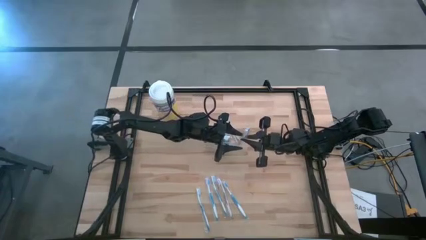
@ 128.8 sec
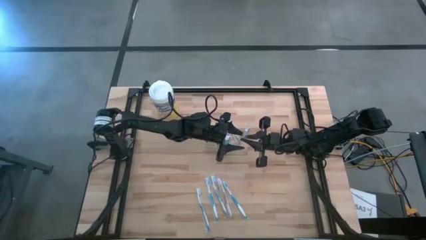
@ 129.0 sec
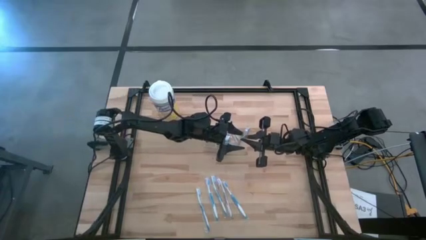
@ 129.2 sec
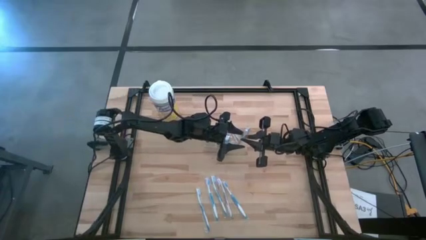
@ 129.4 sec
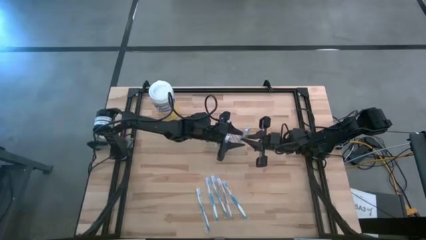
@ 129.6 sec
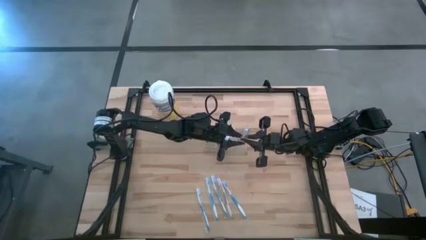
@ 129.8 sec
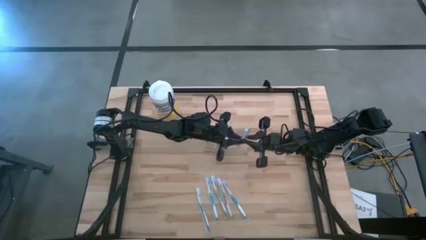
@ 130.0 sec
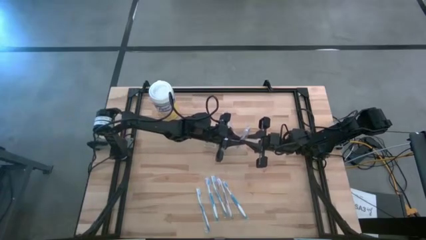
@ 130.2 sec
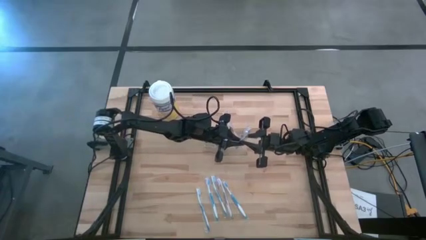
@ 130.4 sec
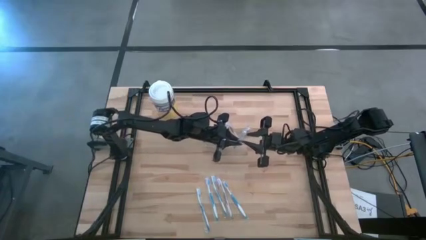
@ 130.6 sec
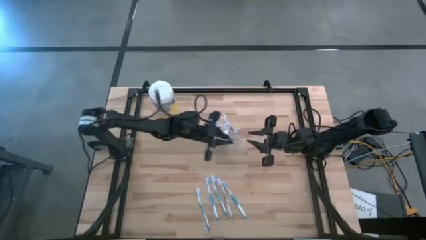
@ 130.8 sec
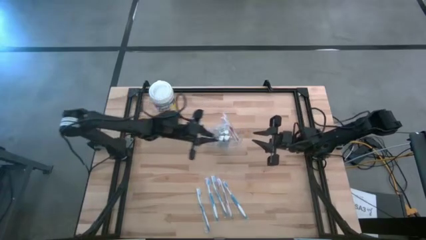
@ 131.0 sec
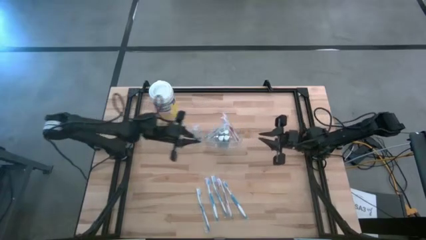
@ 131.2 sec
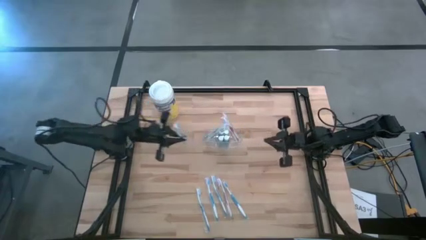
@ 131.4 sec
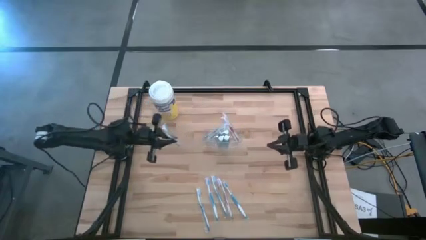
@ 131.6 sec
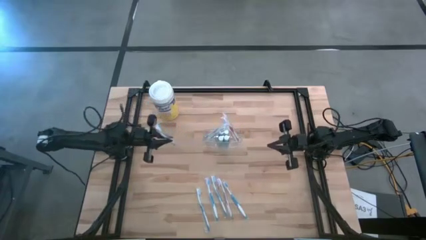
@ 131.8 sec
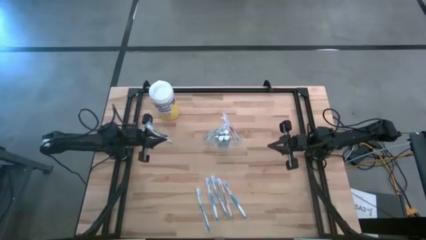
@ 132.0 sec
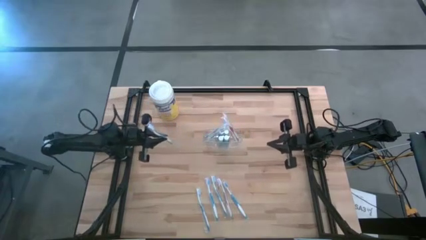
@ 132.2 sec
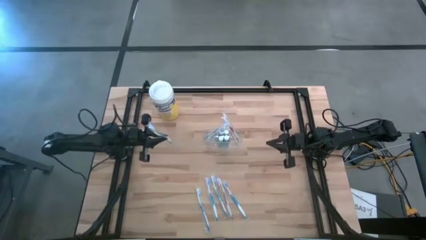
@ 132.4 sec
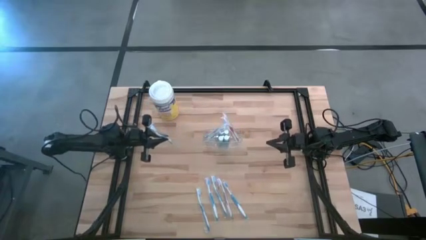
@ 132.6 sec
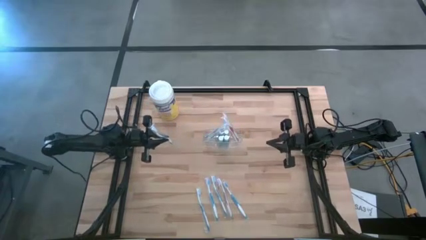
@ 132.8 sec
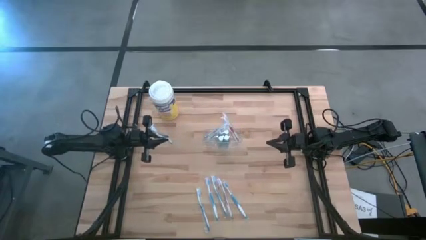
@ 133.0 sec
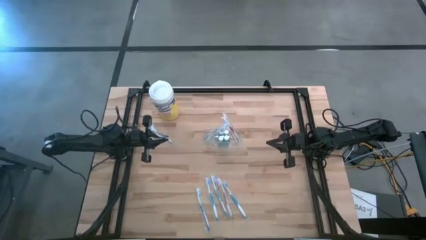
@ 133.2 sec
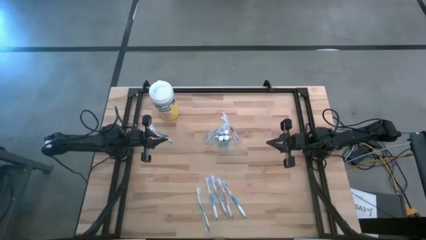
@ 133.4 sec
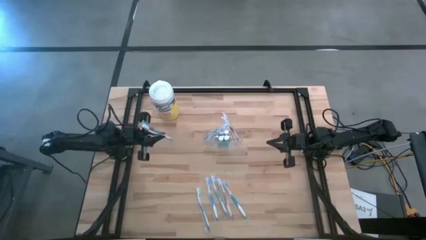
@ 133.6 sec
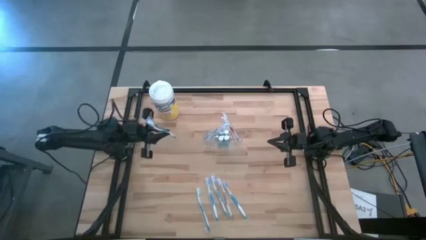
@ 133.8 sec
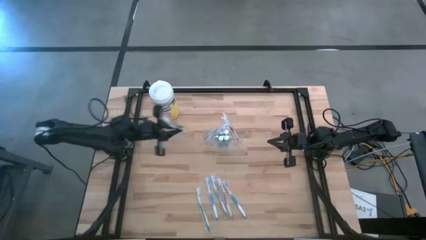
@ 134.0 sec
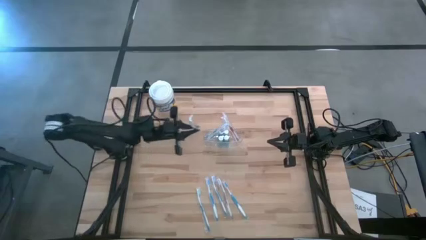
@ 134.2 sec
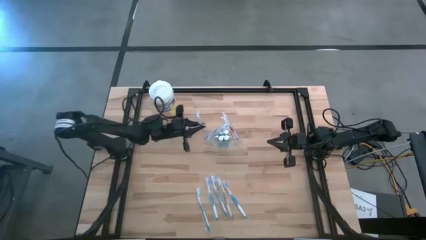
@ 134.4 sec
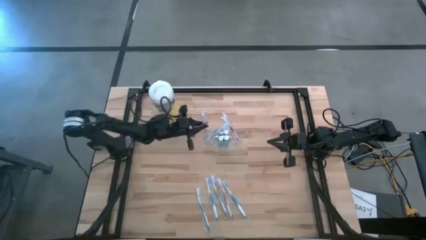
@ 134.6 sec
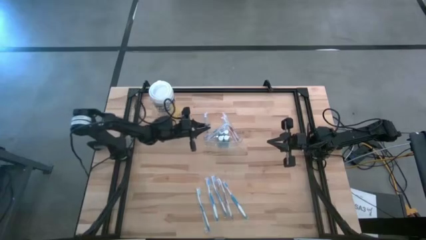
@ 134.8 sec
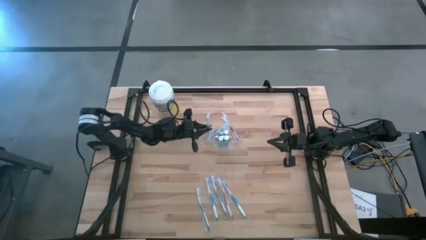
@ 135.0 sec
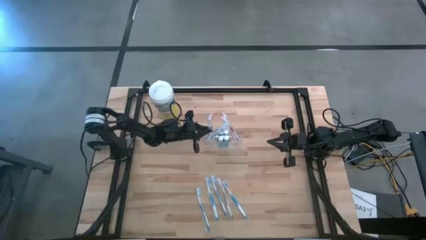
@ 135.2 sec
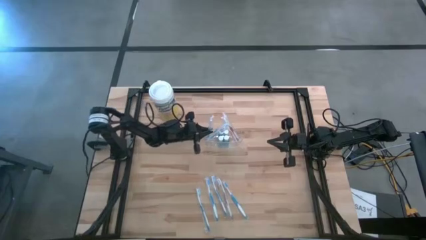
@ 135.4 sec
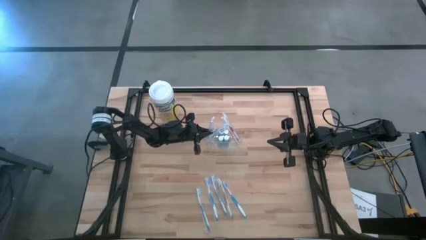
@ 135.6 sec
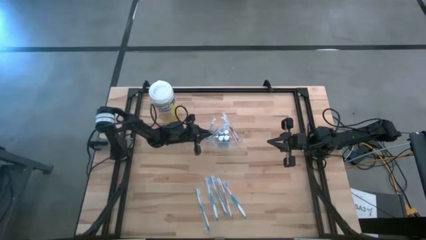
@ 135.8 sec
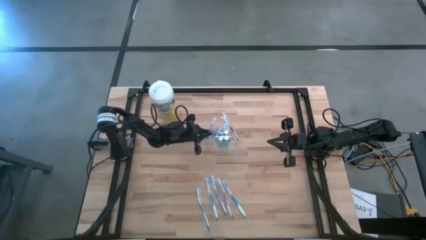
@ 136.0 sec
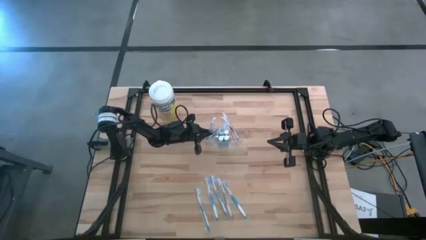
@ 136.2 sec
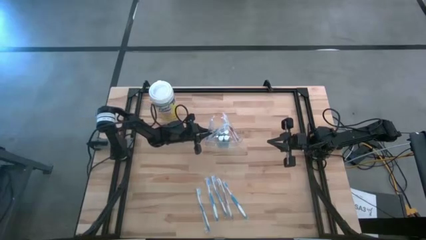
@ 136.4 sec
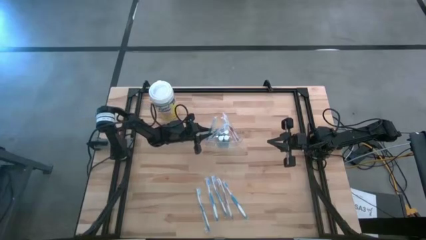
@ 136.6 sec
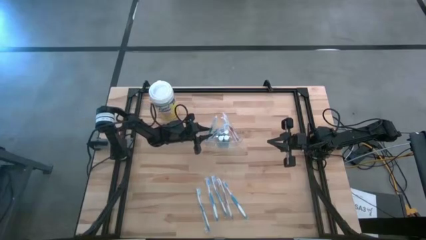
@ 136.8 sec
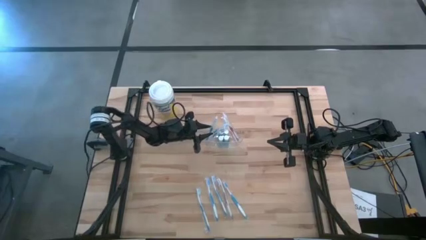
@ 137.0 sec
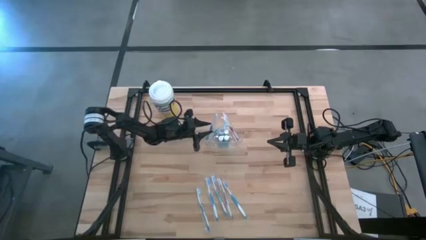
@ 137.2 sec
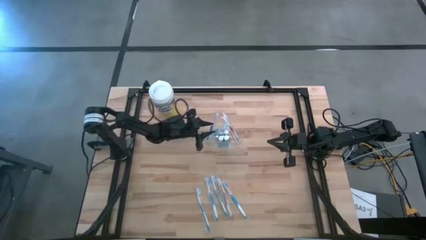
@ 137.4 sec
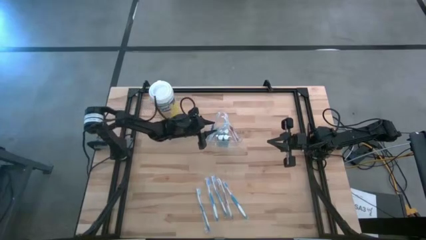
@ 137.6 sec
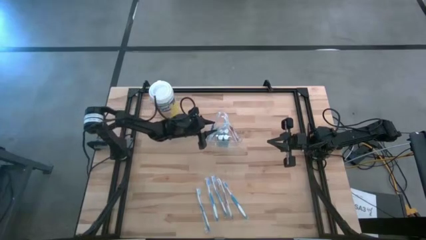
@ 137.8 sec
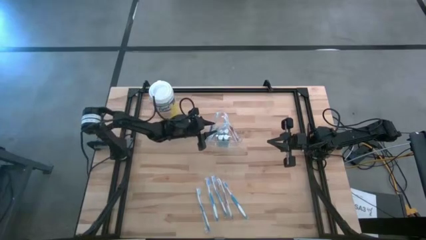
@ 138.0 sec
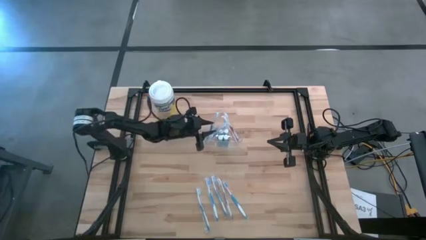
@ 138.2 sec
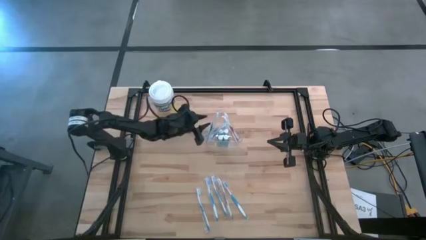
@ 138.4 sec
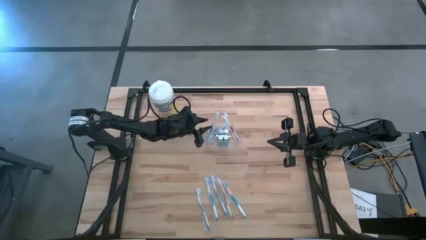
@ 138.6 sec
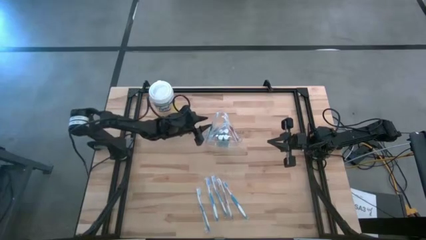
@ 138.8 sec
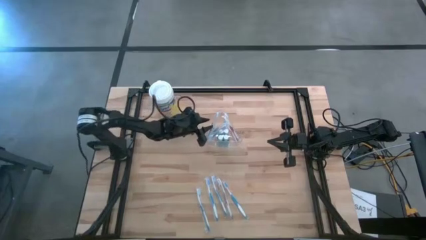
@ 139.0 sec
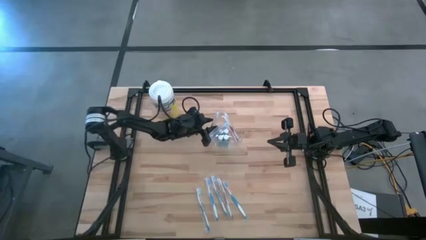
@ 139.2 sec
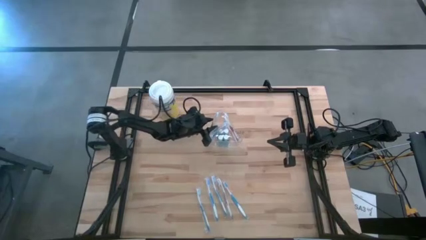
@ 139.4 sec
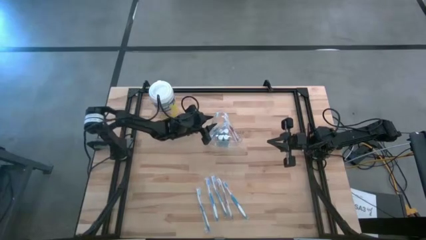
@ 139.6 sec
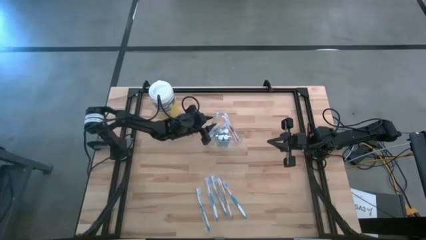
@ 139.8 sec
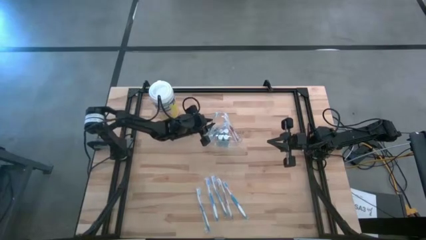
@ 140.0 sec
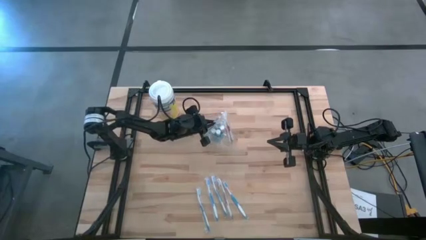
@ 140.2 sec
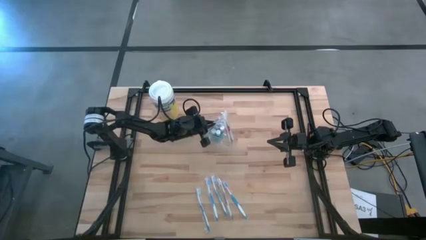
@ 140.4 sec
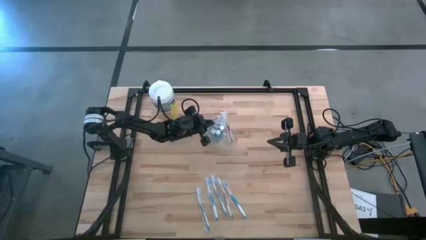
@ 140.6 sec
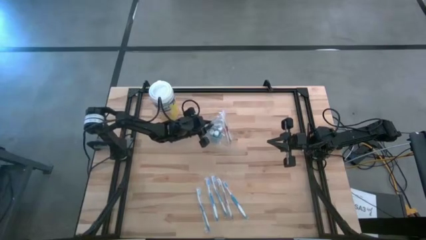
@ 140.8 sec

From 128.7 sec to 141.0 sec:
Task: Pick & Place toothbrushing station
Put the blue toothbrush into the left section of the transparent organizer

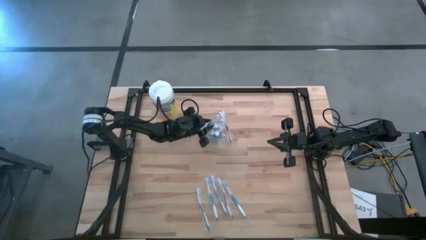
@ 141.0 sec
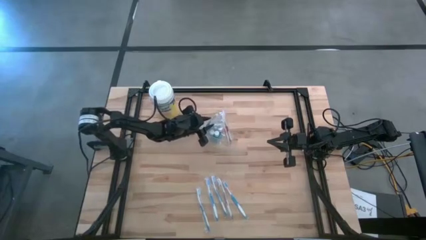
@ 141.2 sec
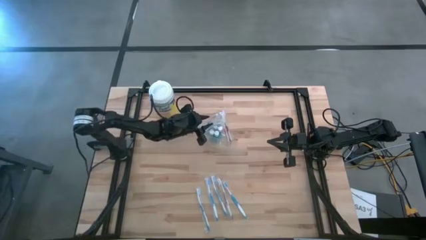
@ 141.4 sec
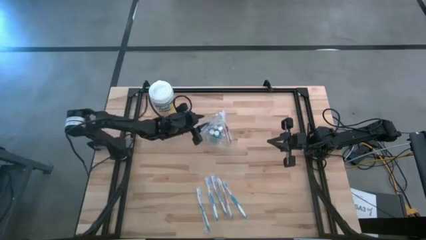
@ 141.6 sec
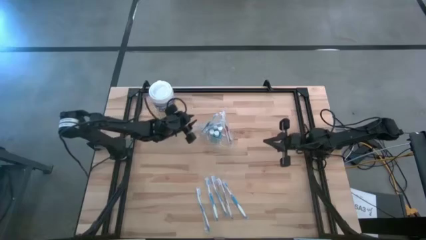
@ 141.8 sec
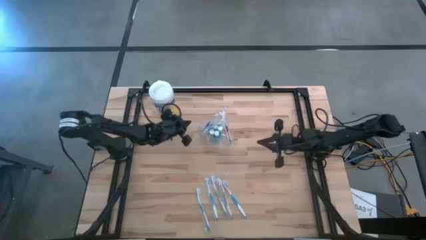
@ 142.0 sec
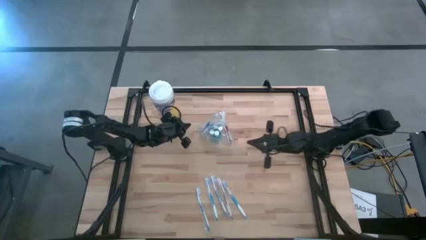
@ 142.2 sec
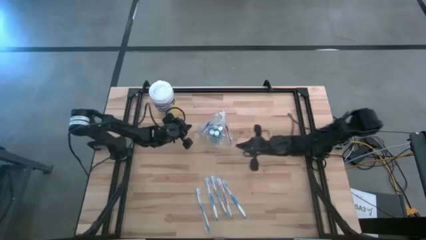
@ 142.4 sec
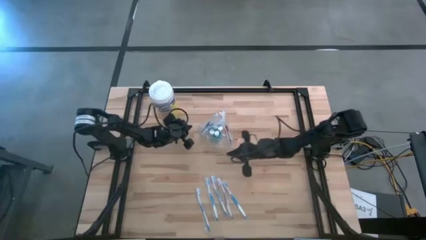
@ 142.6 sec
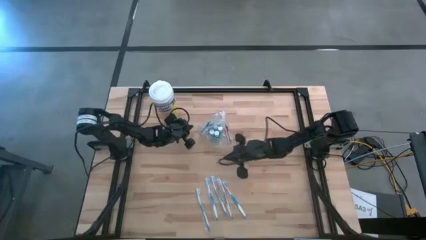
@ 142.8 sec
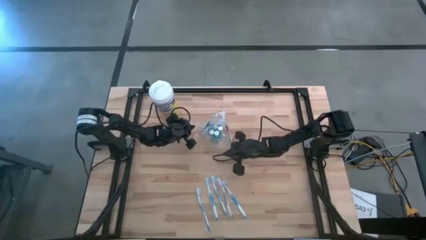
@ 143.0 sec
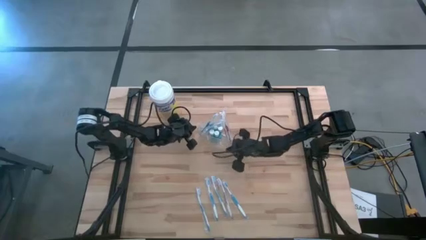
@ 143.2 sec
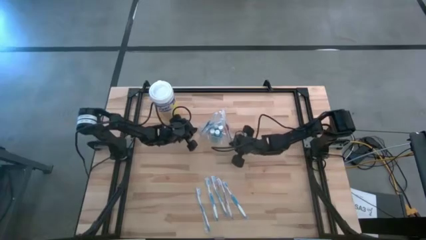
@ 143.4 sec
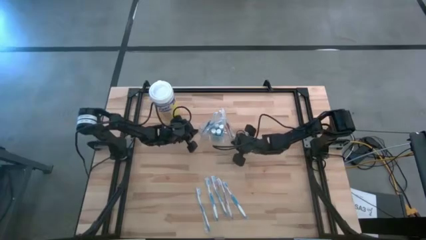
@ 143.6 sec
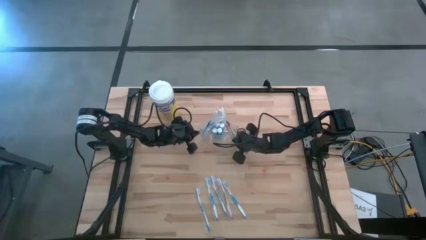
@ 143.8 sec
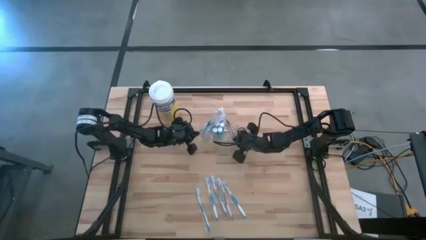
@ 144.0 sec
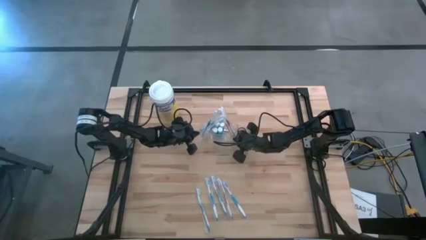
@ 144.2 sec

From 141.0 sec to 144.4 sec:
Adjust the transparent organizer
